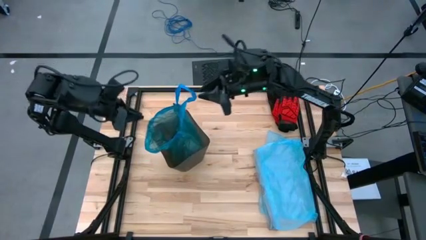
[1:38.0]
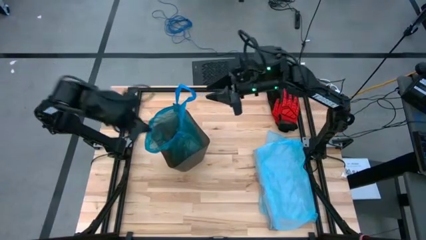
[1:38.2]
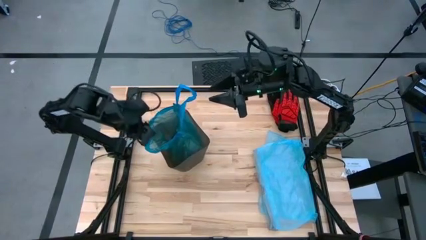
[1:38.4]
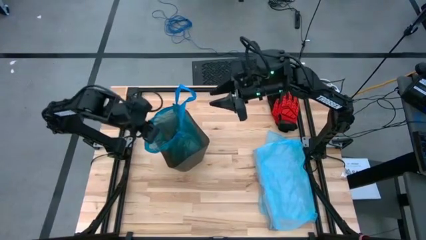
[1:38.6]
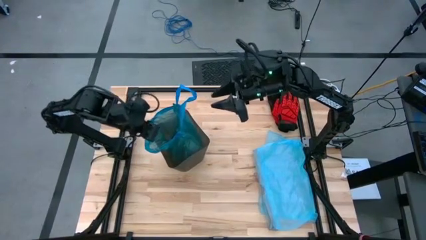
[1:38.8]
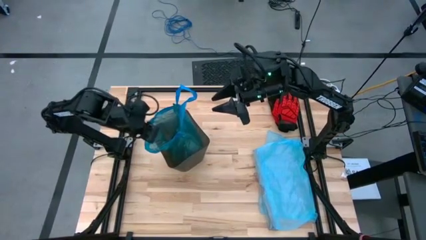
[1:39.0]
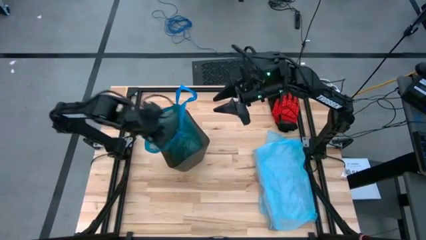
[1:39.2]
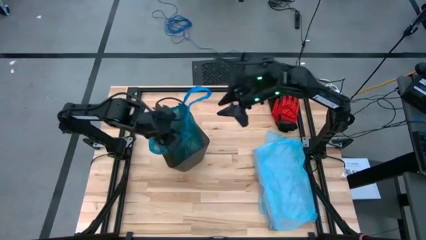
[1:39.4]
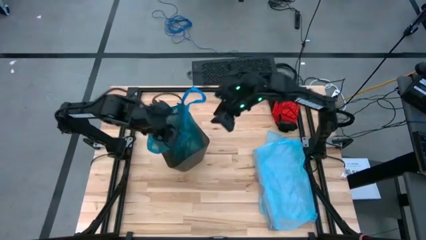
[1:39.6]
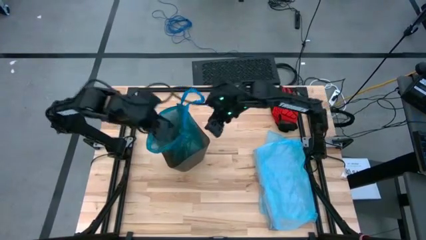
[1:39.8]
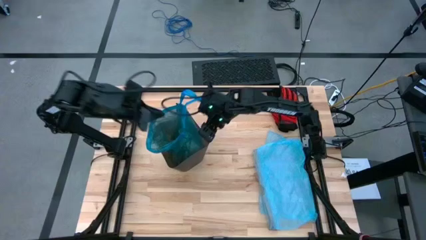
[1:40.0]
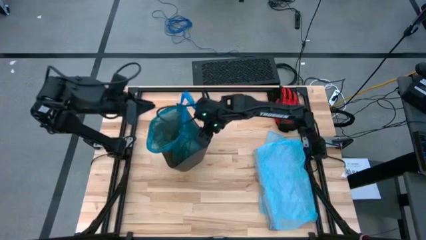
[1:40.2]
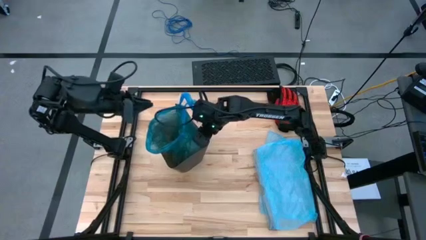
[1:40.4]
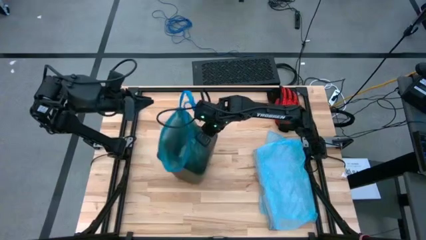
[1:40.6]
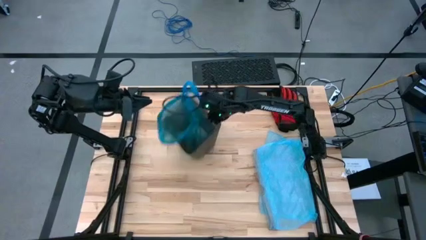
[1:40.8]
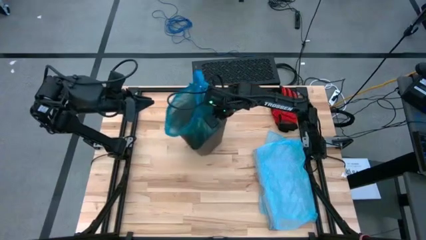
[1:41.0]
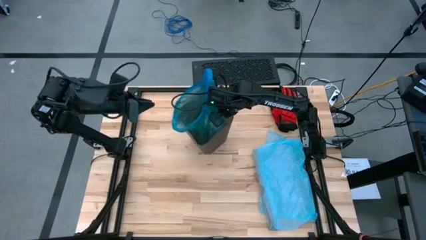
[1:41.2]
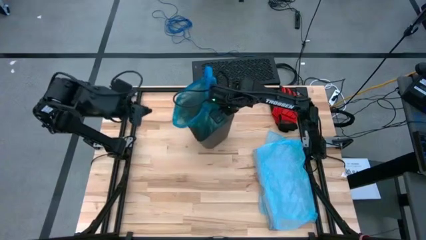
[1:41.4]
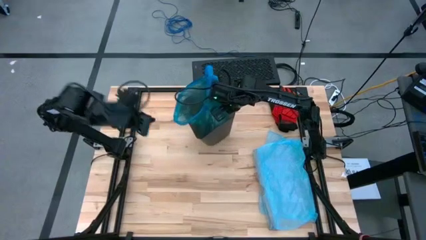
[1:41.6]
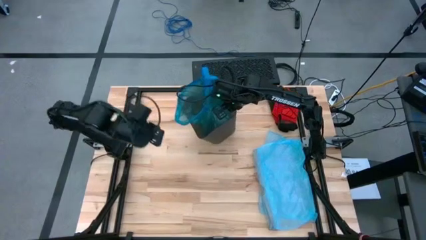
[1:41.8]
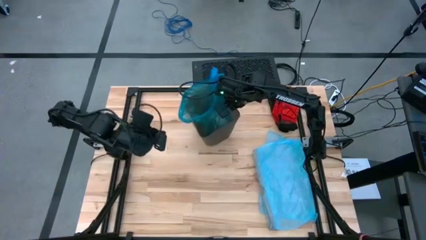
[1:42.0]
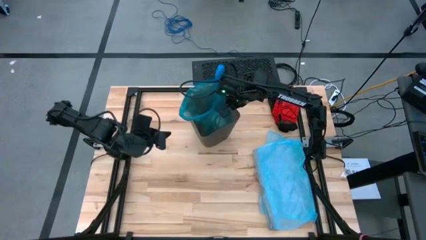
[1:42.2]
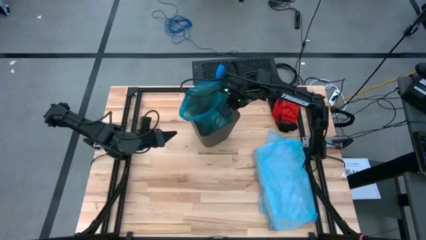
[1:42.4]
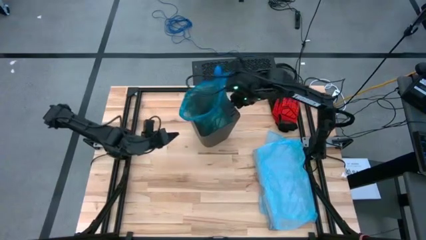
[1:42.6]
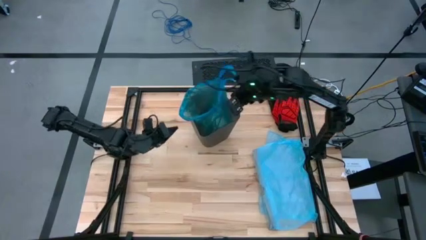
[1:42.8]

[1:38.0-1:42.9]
Task: place trash/remove bag and relplace
Move the trash bin to the top of the table

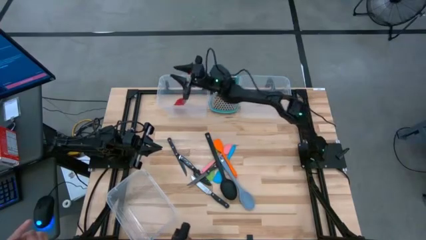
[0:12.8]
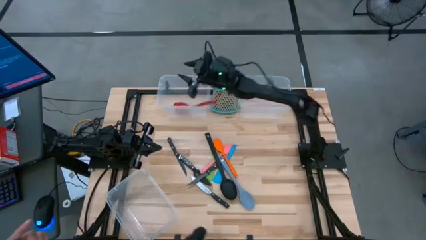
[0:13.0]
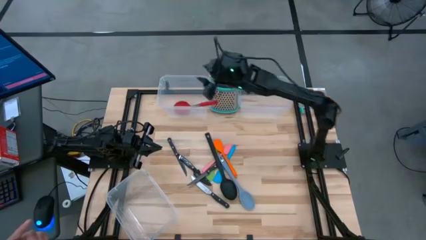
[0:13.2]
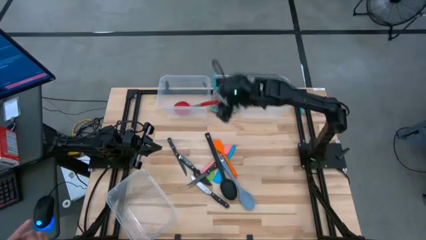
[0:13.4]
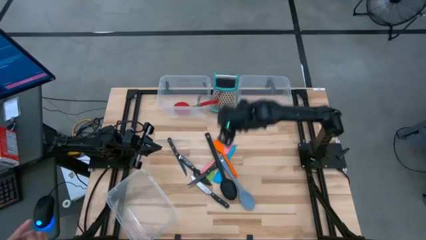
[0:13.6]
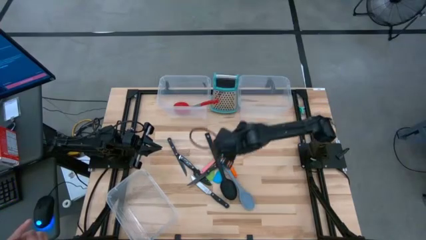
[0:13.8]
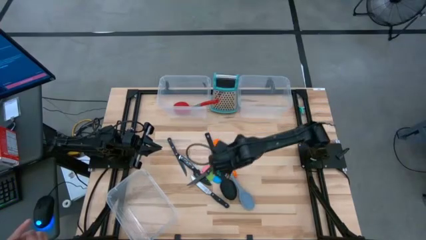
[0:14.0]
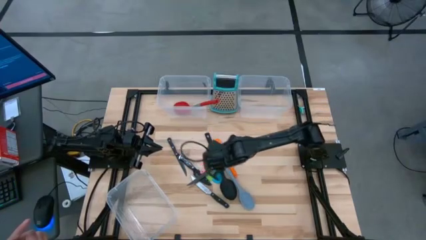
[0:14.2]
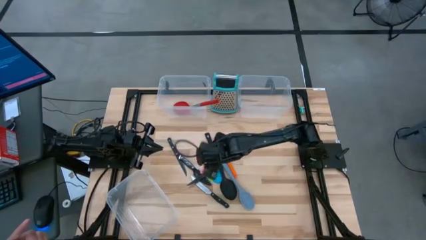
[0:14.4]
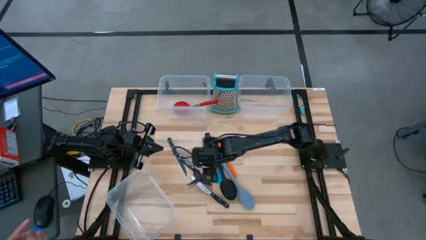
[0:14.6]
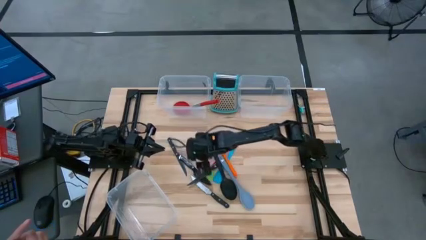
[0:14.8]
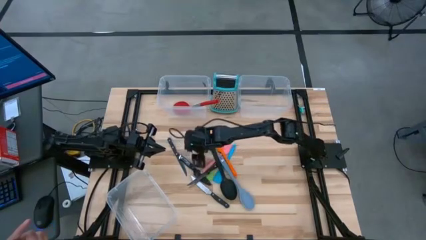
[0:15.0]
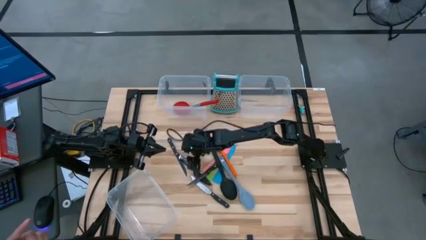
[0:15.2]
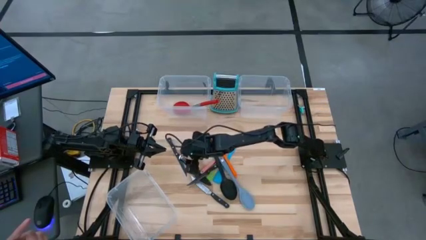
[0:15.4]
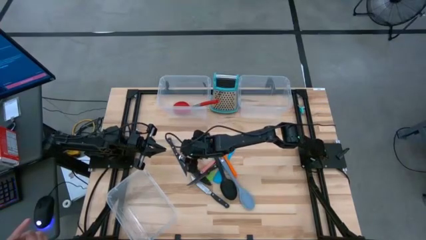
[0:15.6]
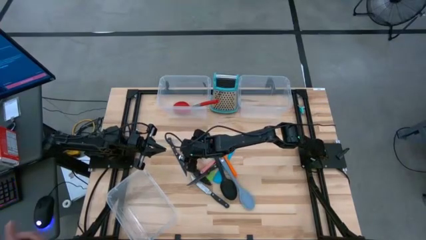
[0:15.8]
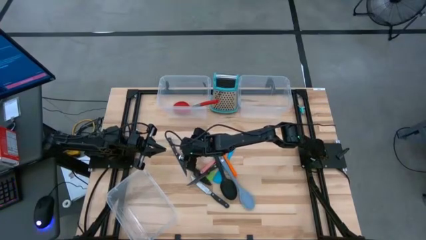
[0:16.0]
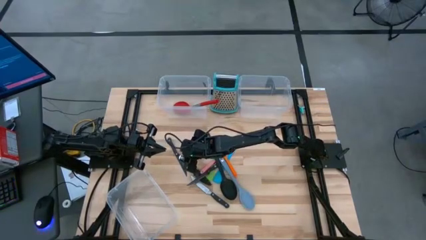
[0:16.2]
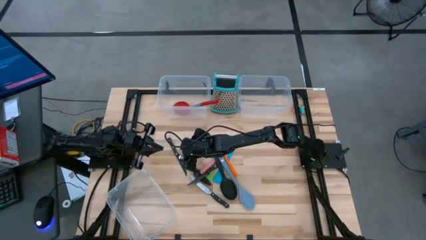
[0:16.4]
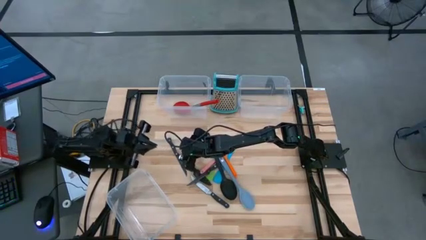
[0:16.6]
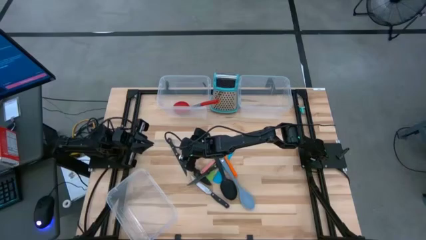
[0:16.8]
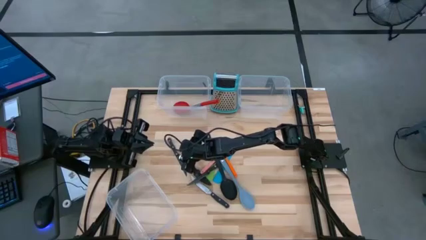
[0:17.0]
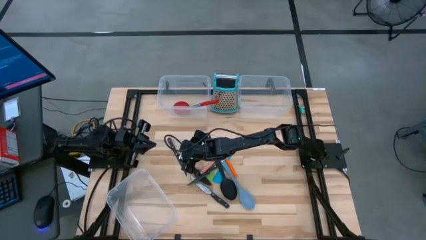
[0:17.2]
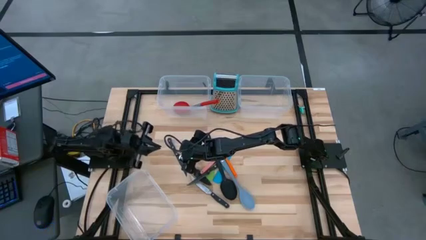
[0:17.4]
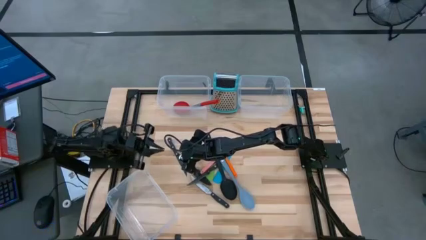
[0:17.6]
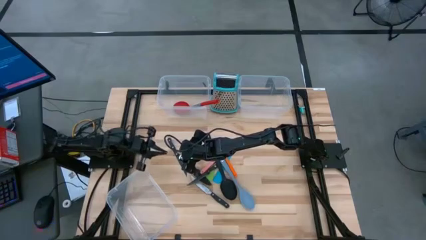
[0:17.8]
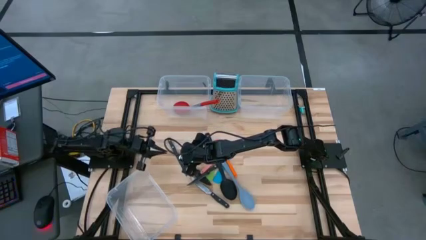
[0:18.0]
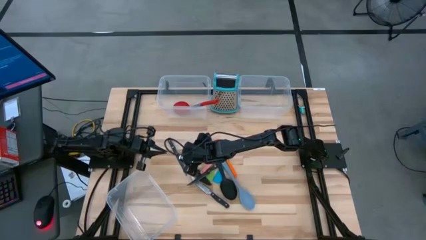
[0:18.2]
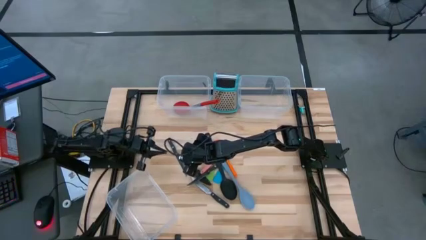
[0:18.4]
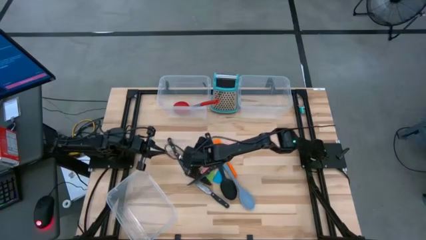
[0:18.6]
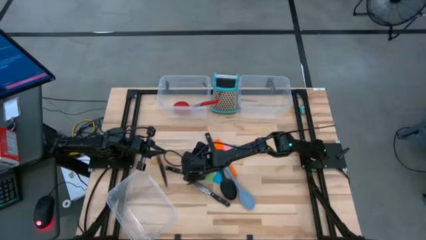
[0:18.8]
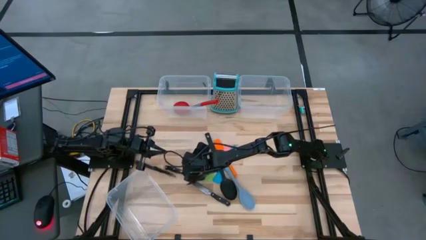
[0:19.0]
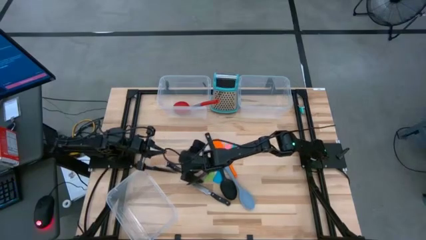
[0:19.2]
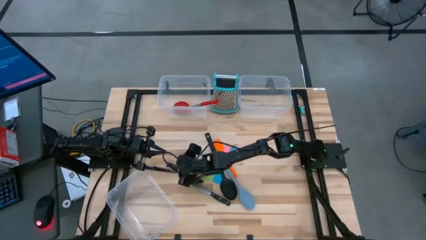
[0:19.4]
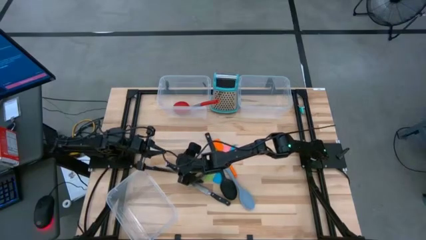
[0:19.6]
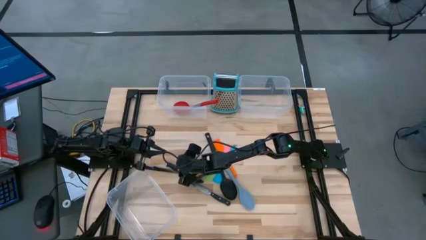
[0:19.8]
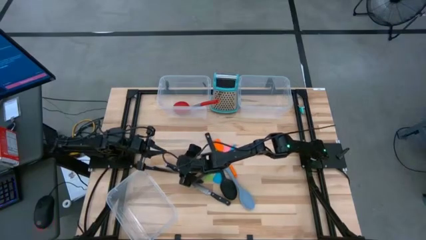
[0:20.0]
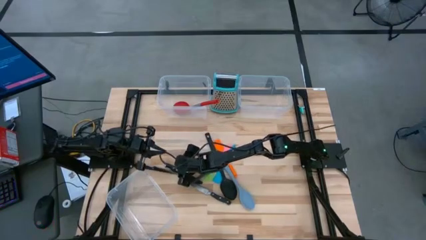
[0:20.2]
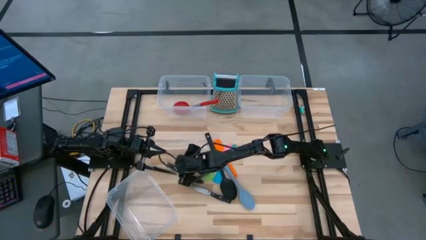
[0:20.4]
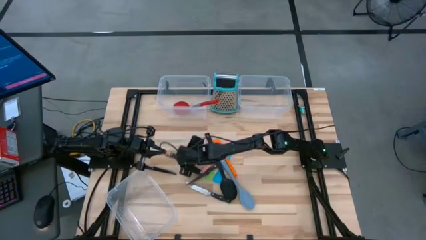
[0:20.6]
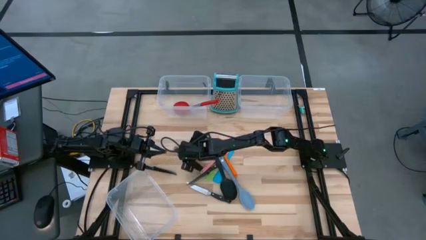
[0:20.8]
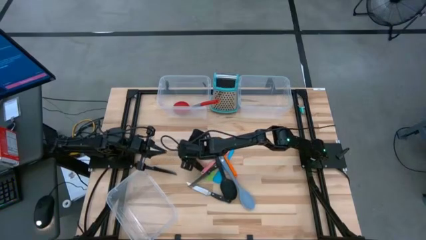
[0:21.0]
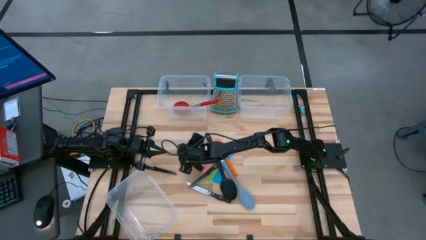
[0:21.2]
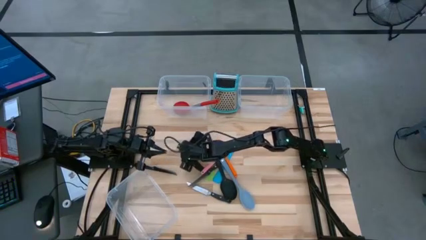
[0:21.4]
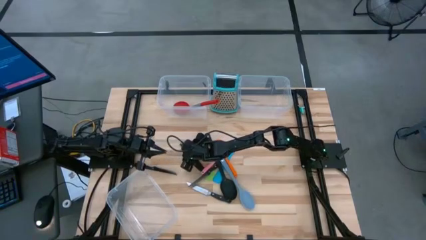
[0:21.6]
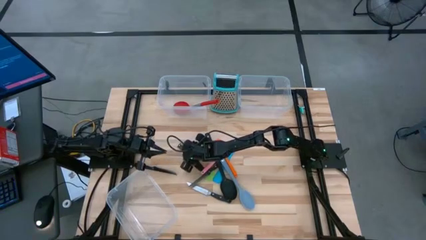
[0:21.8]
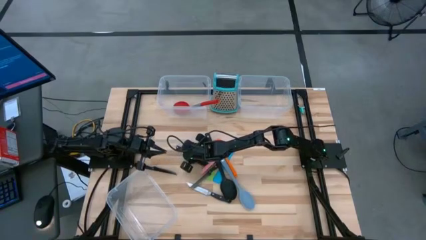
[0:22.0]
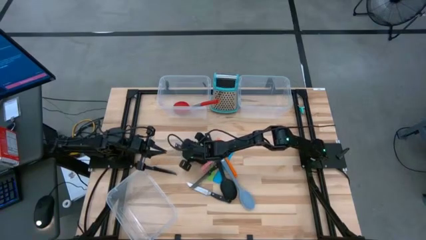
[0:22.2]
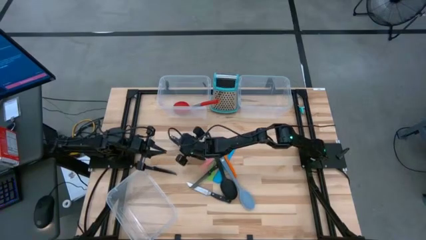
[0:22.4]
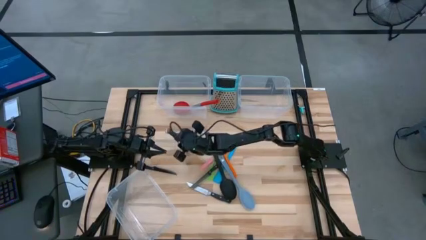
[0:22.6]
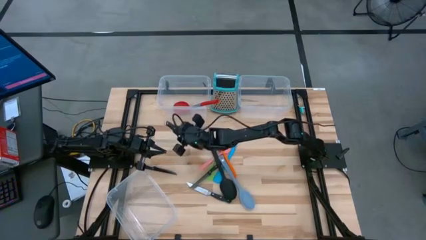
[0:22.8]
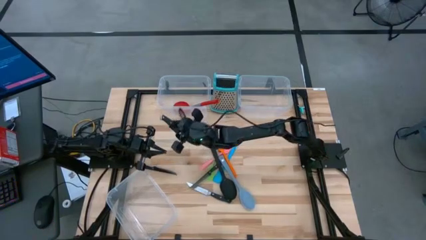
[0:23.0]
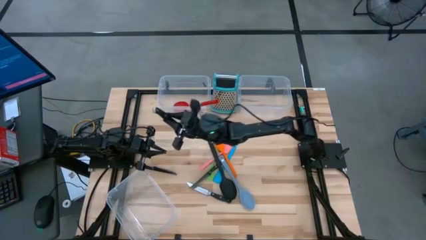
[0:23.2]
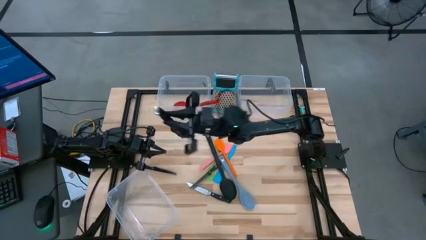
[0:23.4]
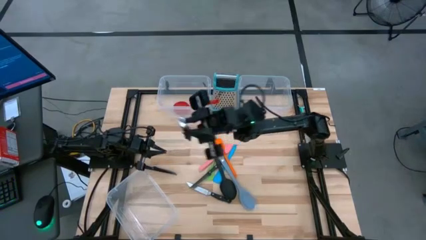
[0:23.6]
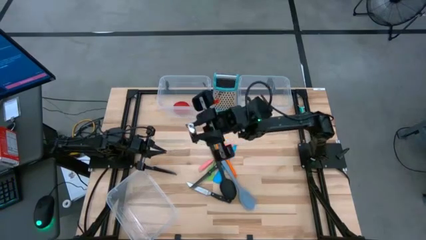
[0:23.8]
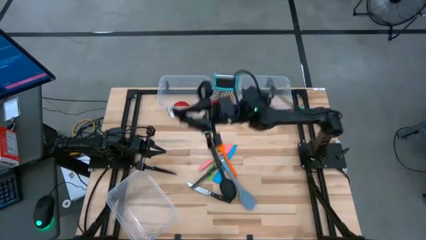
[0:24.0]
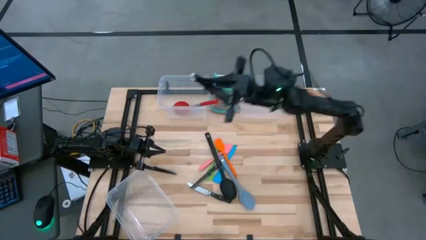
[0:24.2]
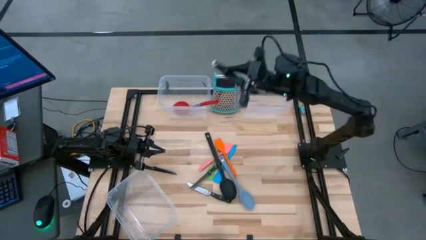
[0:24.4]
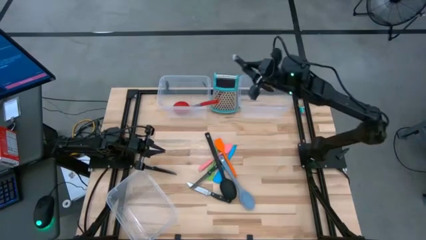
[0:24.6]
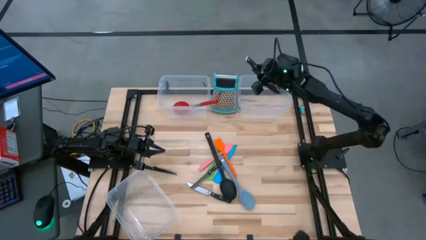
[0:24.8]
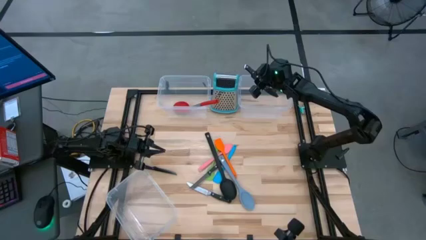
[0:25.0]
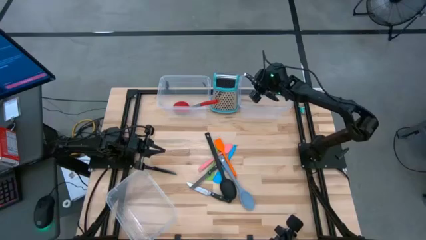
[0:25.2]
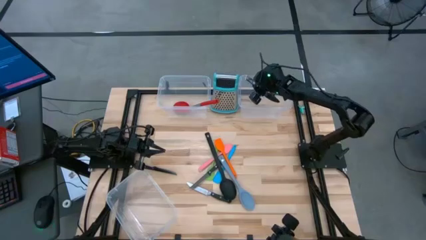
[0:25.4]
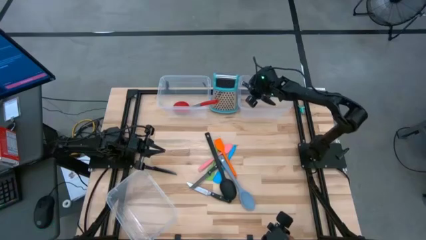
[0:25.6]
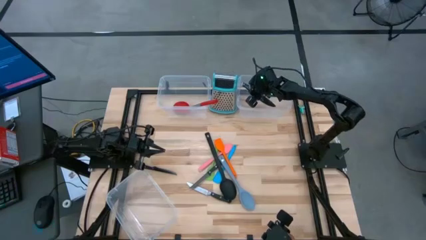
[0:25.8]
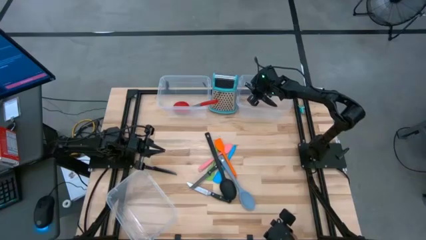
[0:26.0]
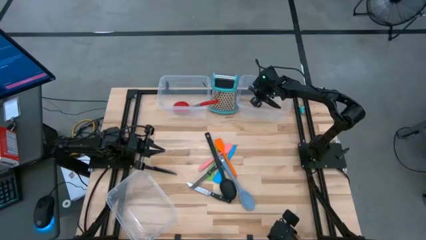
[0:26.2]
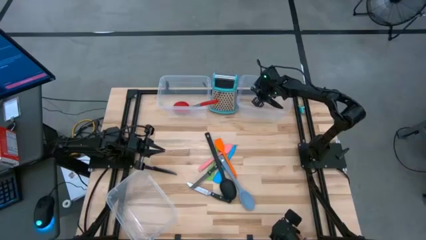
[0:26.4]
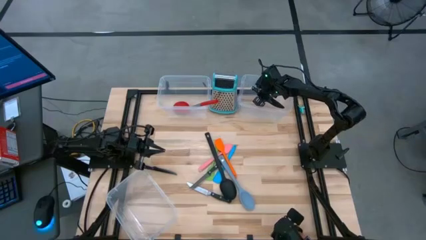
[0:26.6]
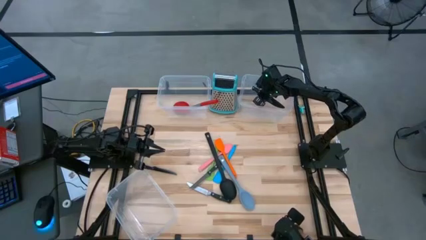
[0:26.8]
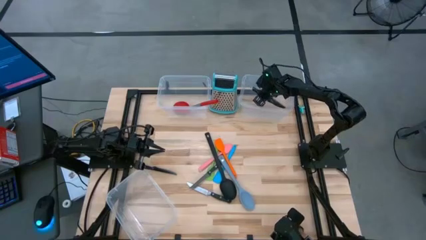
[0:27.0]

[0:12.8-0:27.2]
Task: Pick & Place Kitchen Items
Put the black table knife into the top right transparent bin
